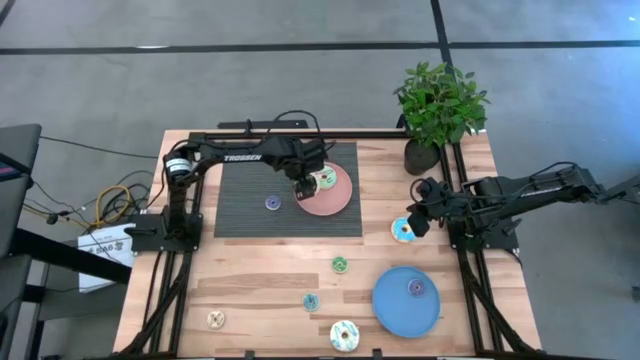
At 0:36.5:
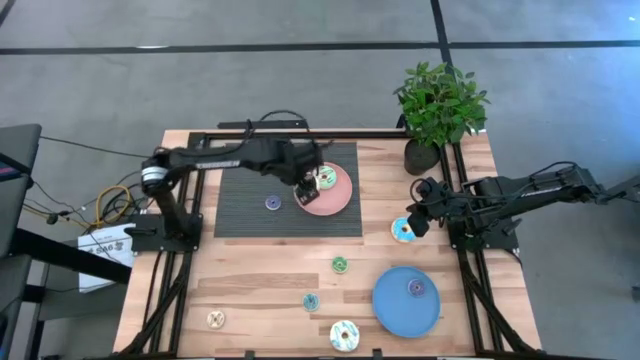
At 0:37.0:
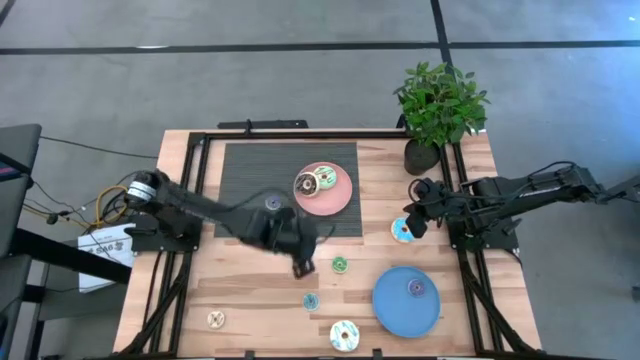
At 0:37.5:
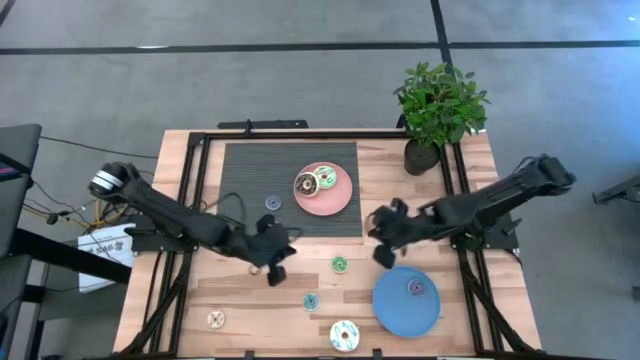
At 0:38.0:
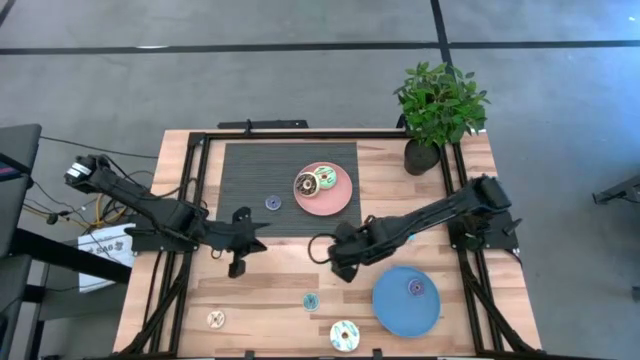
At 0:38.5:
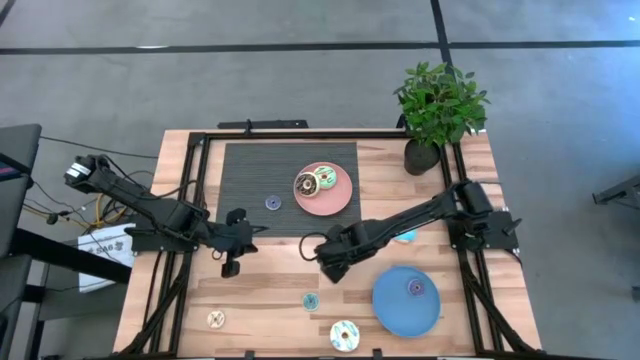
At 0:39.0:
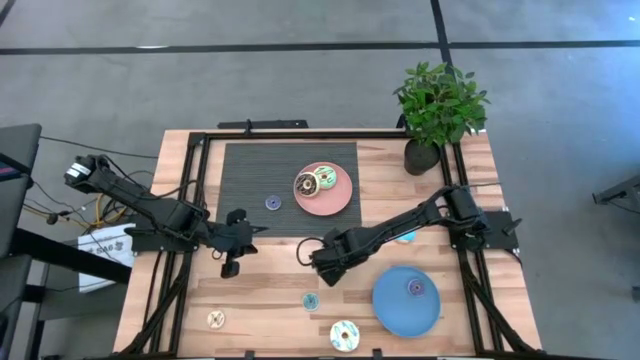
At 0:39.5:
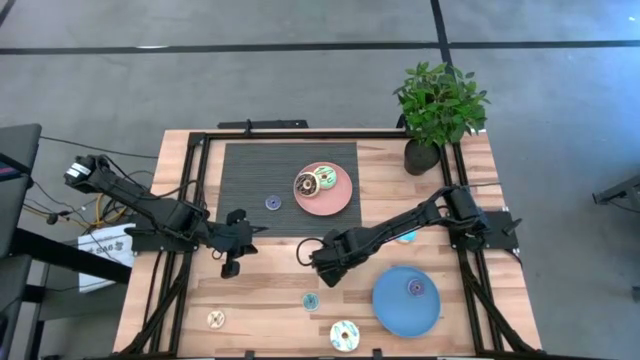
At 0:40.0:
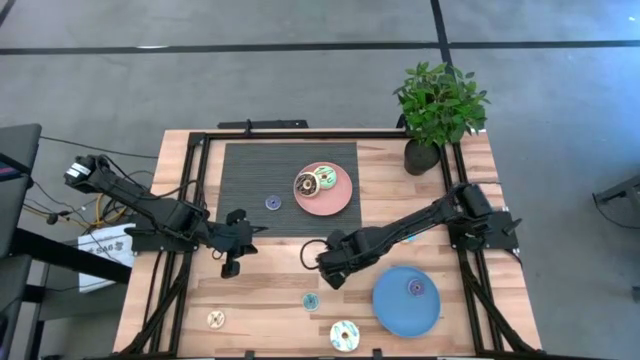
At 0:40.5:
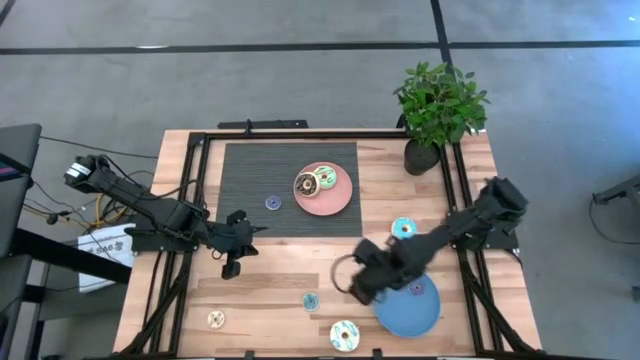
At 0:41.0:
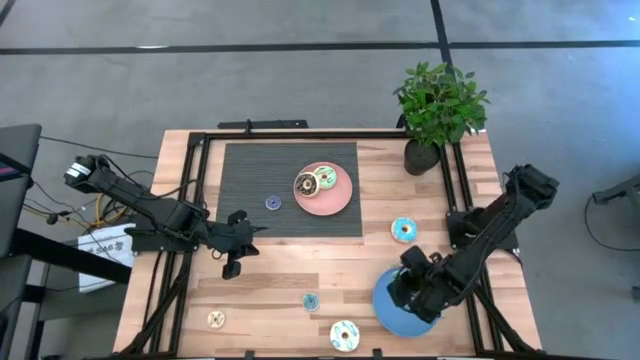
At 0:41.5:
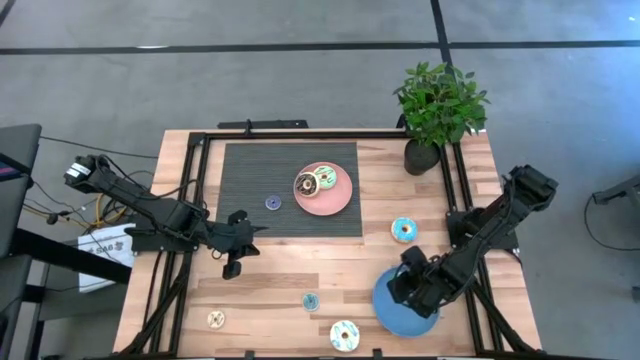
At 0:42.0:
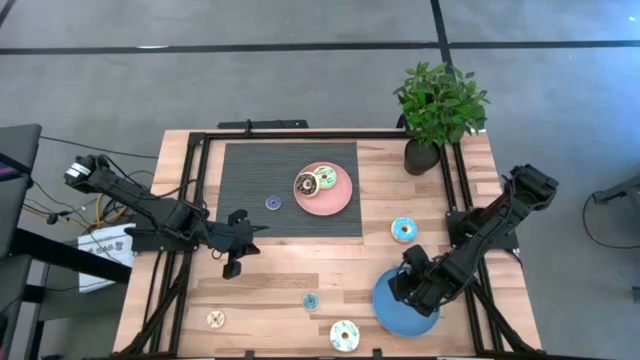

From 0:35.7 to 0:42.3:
Task: Pick & Place donuts
Put the small green donut on the blue plate

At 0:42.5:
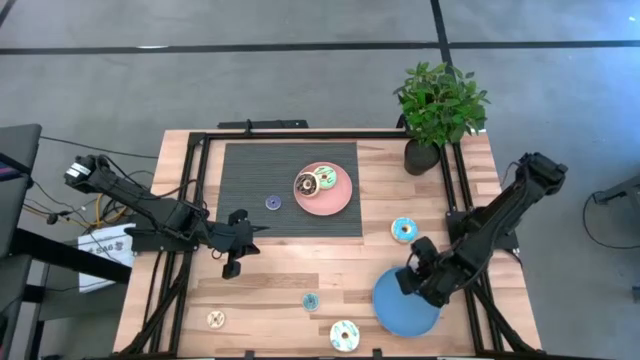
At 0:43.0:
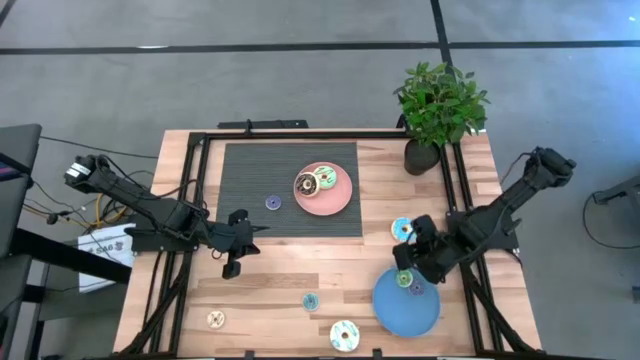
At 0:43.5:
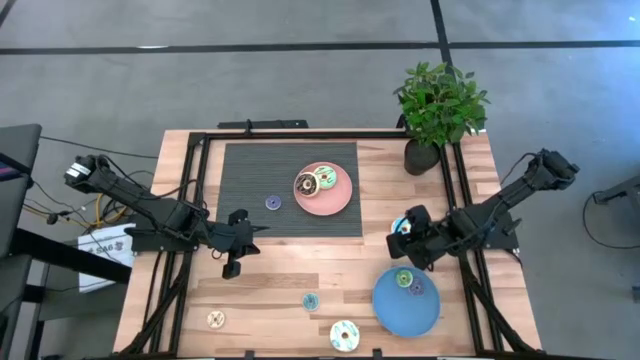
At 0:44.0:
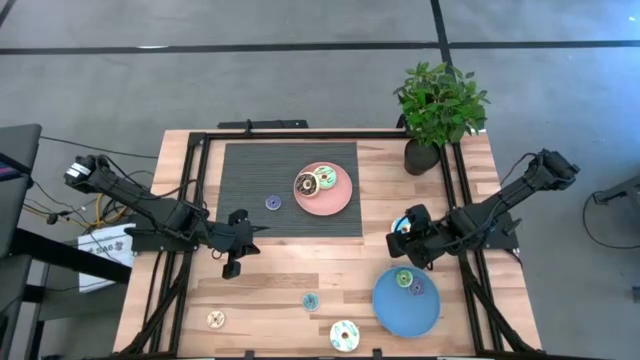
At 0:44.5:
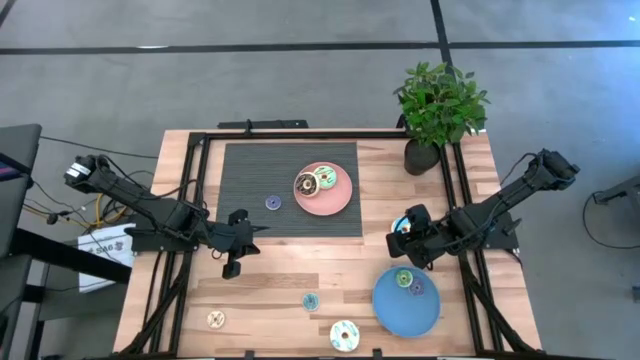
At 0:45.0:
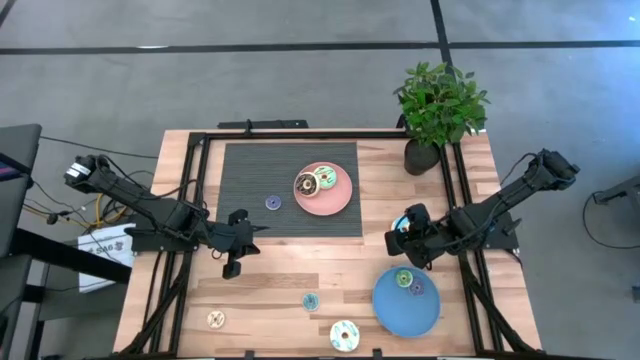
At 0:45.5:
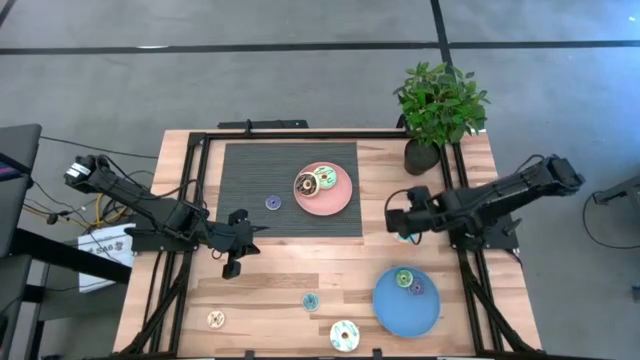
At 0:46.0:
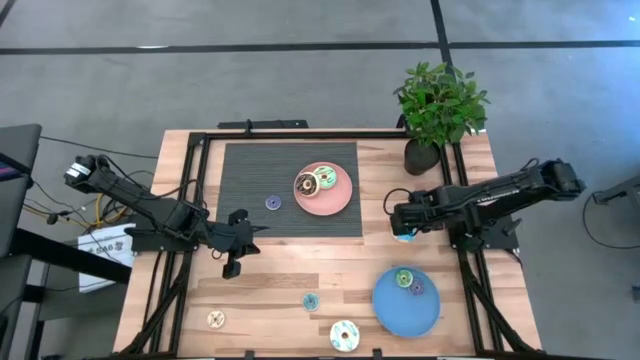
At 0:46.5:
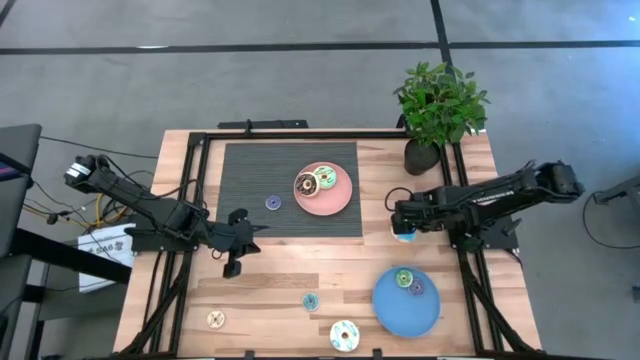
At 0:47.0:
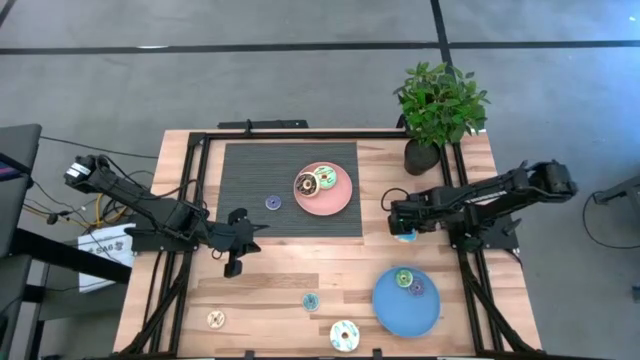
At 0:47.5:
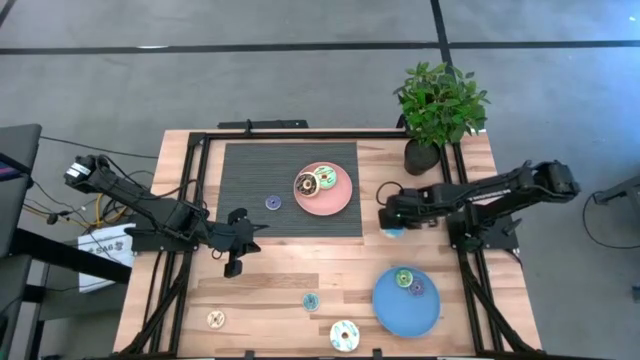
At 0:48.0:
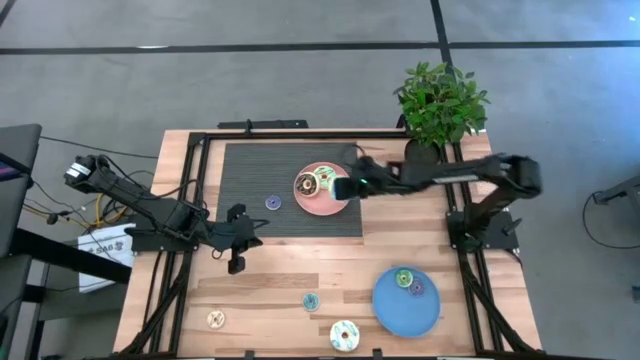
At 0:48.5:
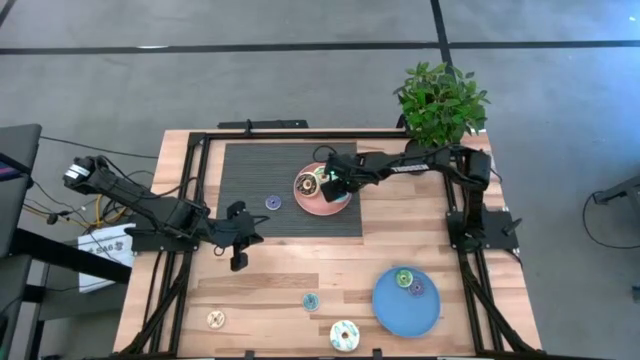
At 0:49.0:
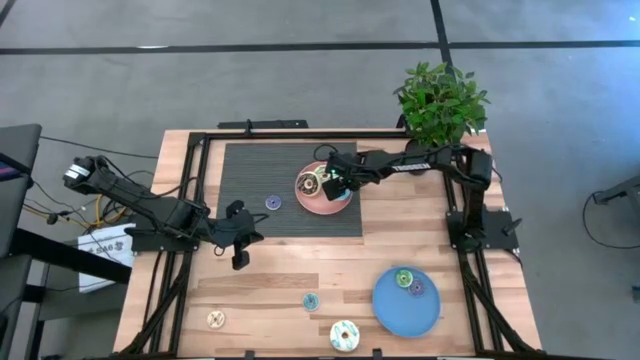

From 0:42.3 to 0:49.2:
Put the big blue donut on the pink plate

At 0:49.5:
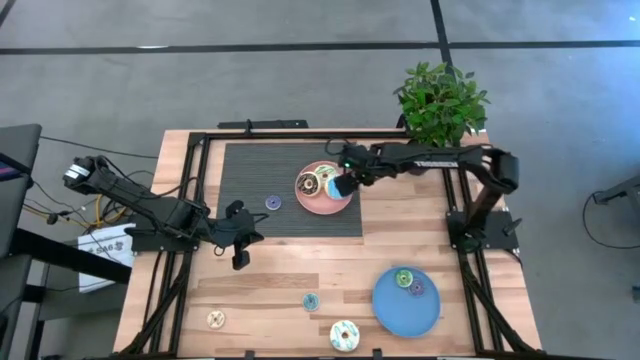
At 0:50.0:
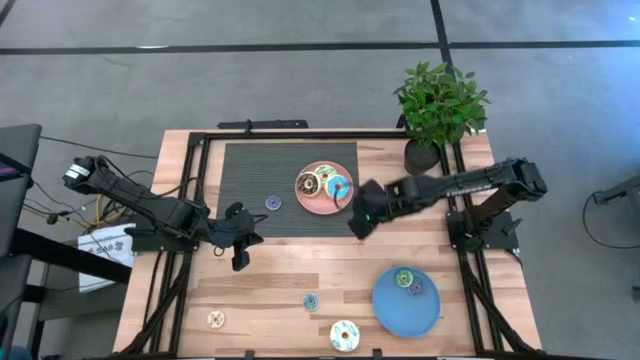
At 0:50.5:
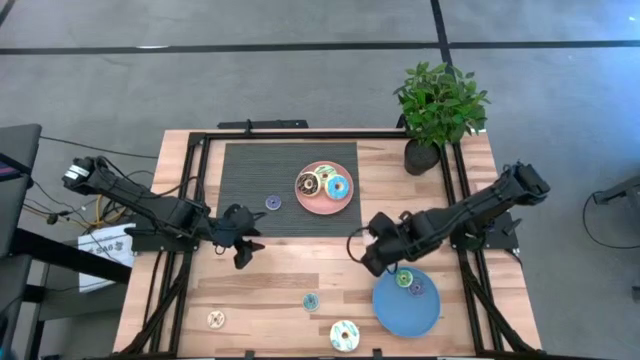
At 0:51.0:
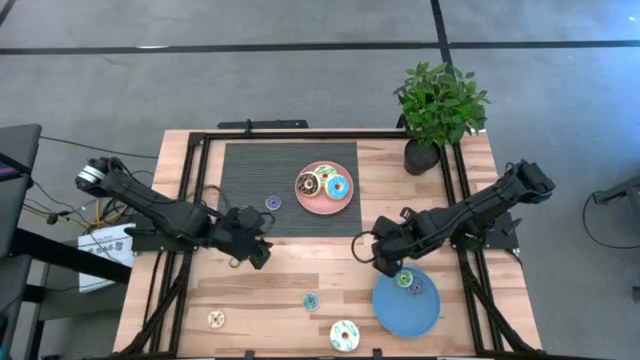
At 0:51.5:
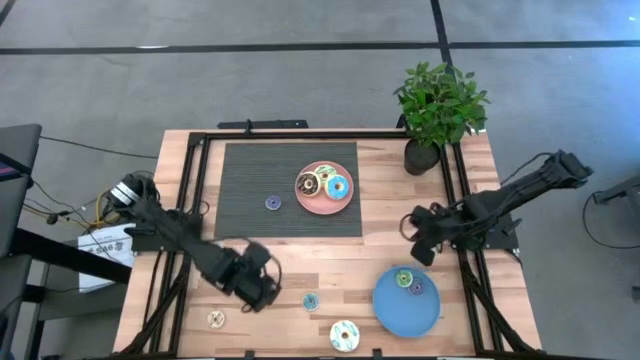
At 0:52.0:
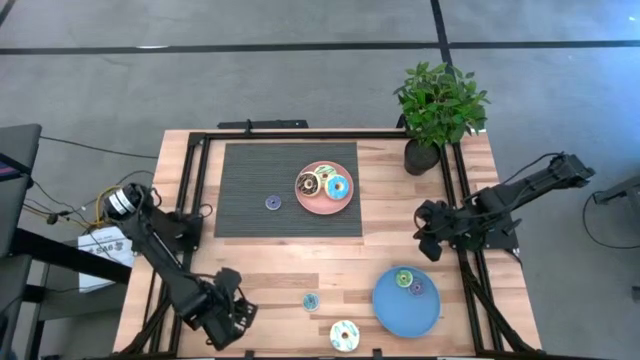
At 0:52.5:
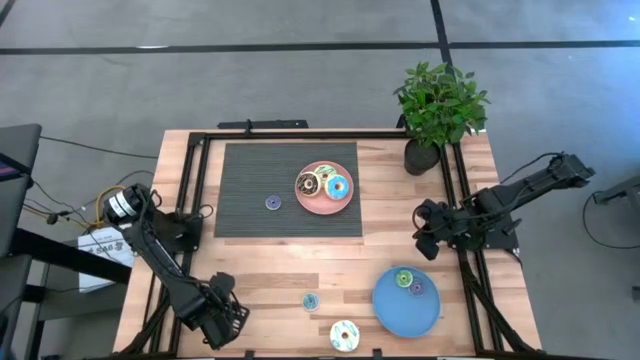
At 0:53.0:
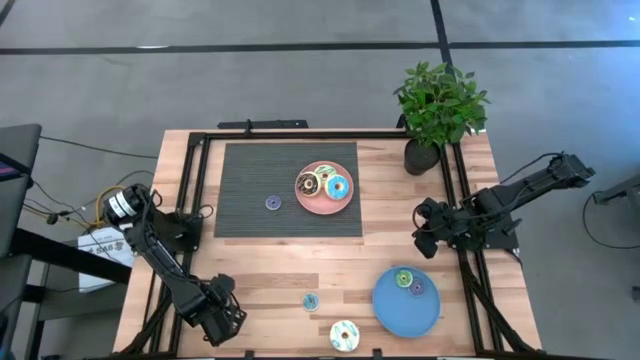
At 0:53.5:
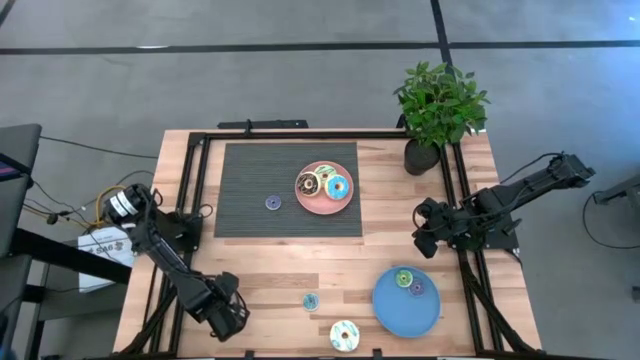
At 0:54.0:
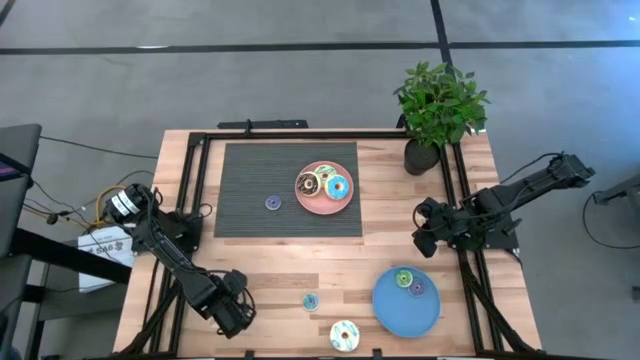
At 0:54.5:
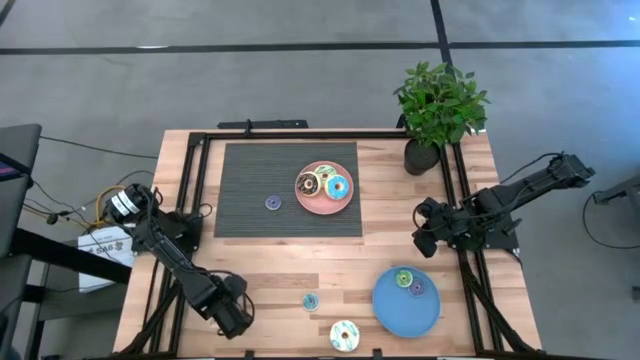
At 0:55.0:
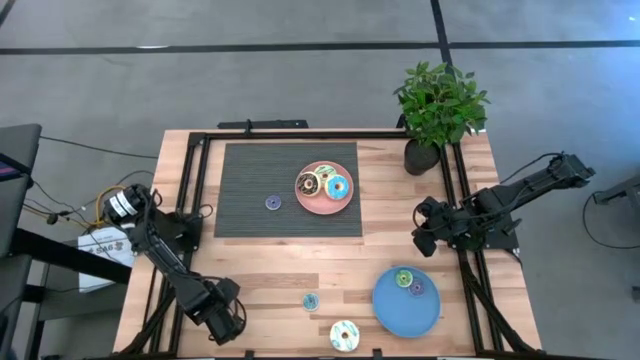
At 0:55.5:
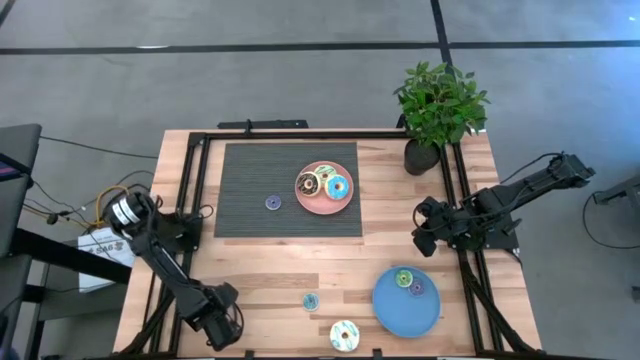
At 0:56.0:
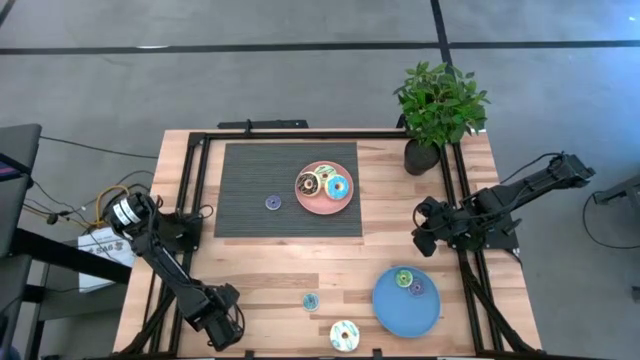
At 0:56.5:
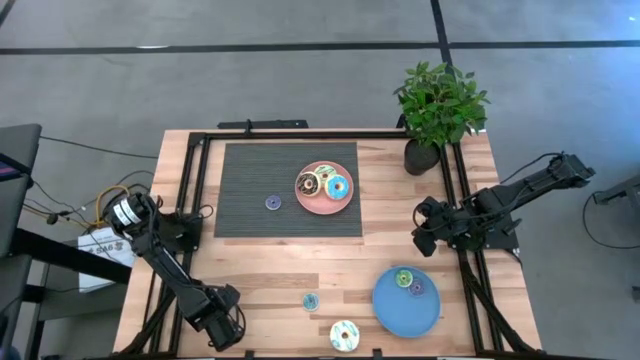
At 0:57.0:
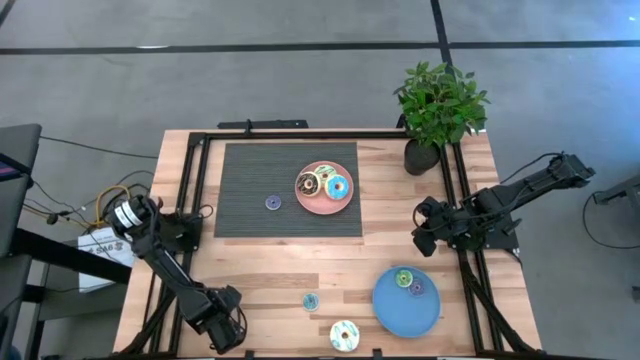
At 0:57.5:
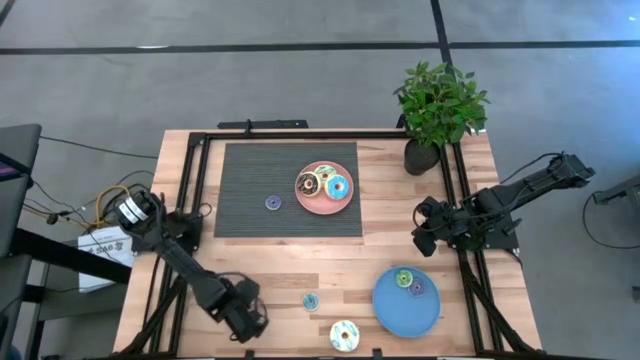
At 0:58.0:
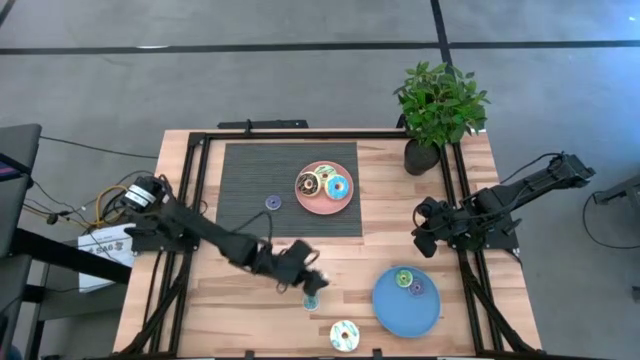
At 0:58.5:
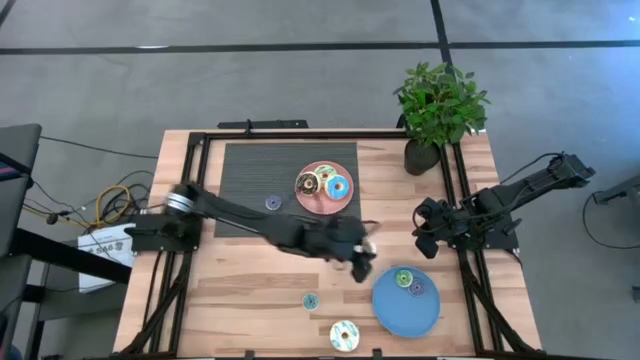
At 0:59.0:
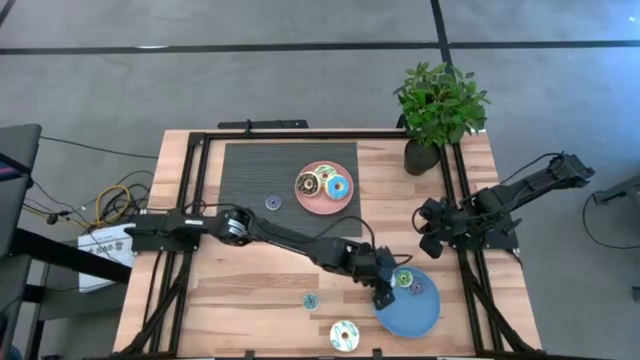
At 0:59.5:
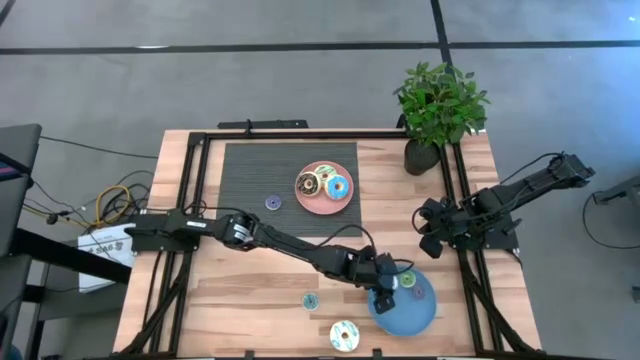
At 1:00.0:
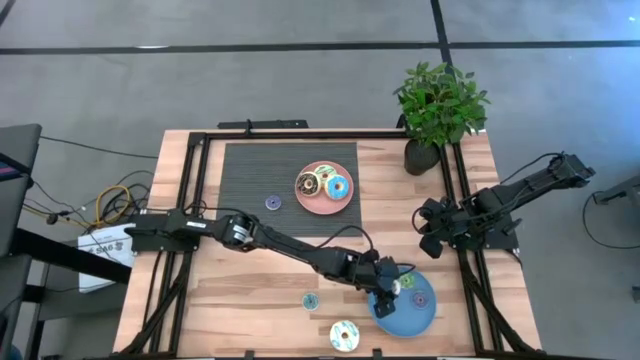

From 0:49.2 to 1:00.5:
Put the small white donut on the blue plate
